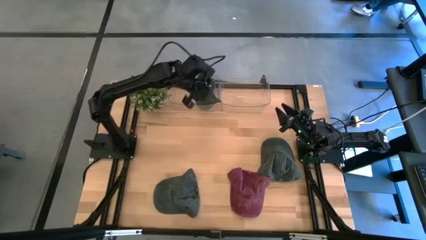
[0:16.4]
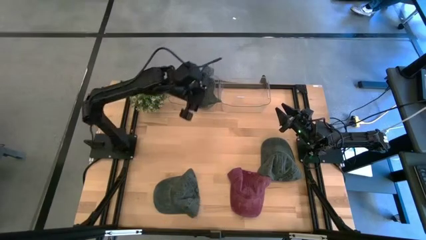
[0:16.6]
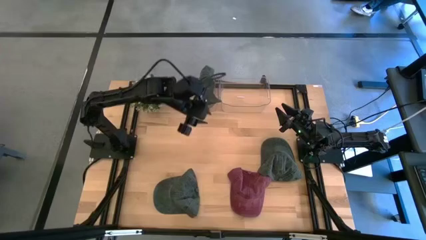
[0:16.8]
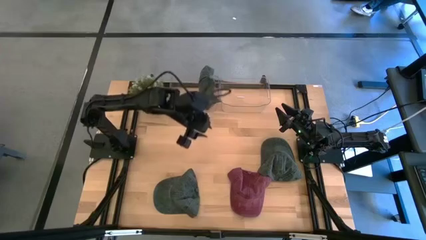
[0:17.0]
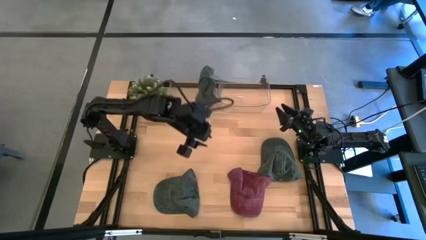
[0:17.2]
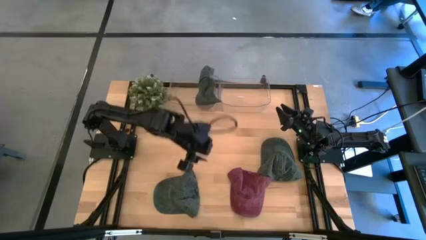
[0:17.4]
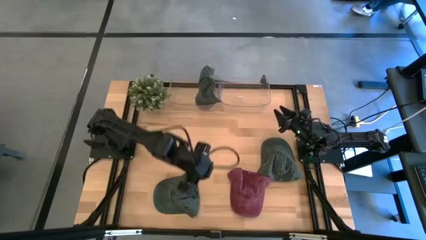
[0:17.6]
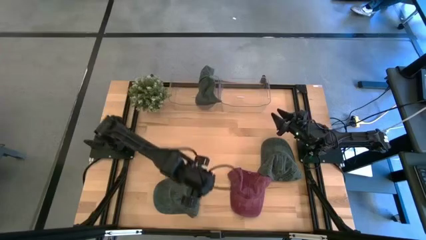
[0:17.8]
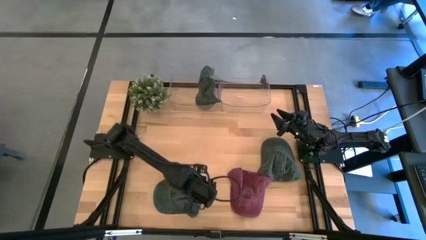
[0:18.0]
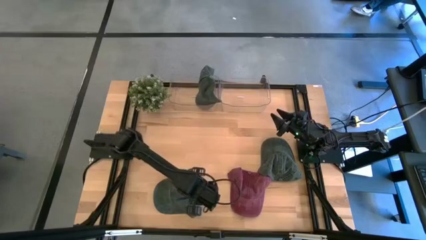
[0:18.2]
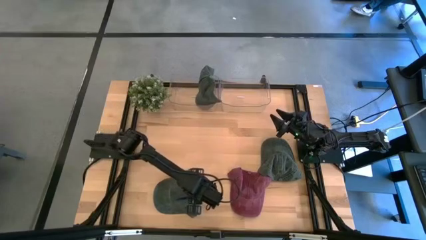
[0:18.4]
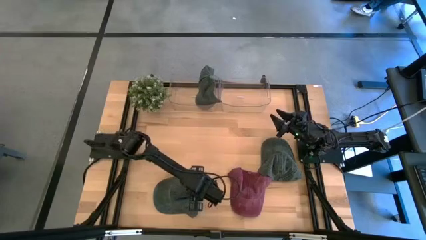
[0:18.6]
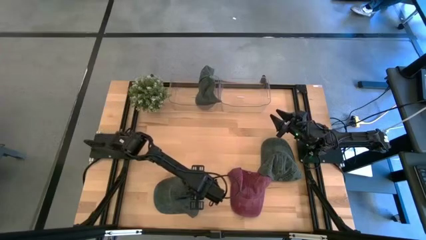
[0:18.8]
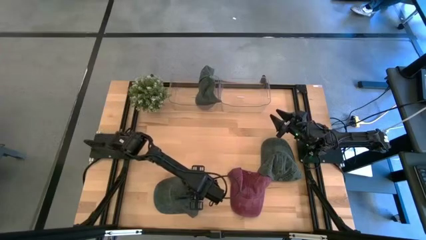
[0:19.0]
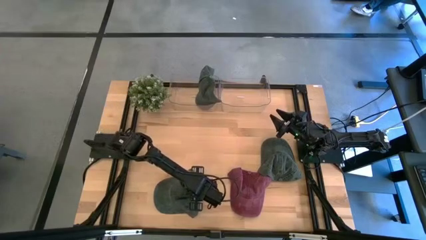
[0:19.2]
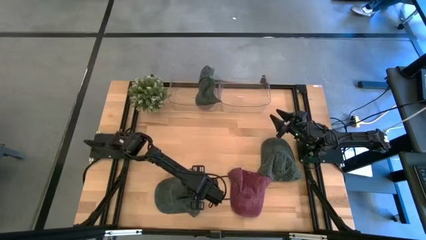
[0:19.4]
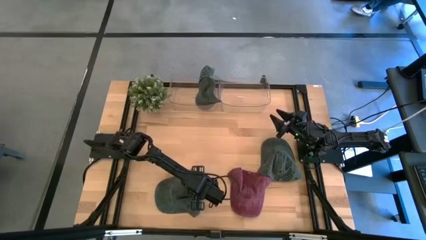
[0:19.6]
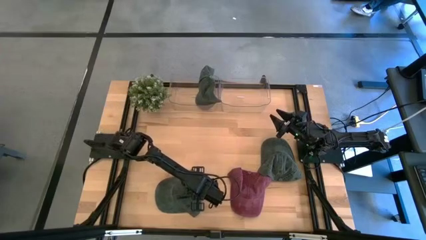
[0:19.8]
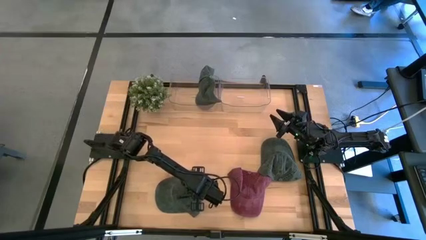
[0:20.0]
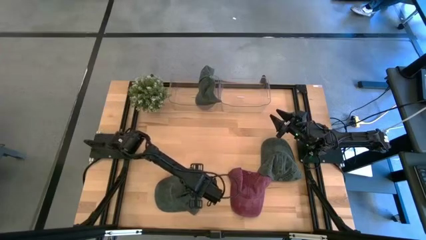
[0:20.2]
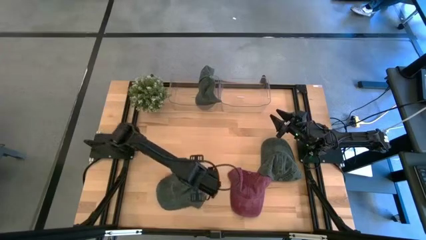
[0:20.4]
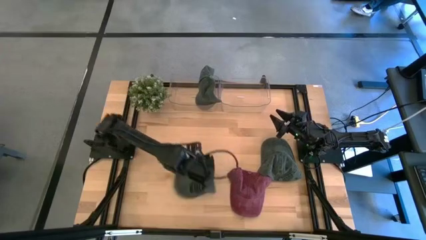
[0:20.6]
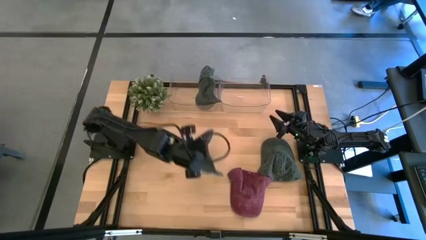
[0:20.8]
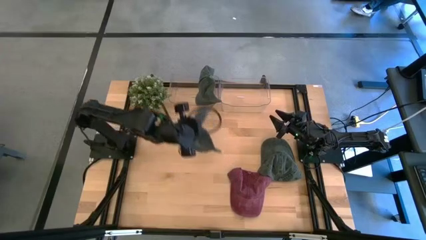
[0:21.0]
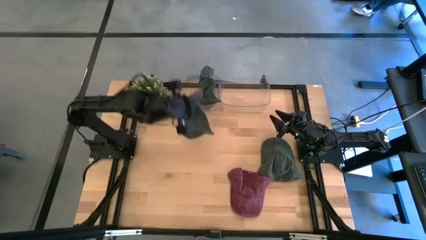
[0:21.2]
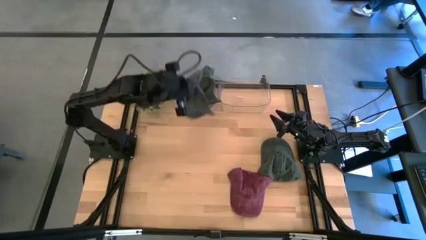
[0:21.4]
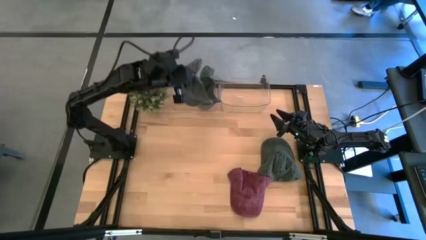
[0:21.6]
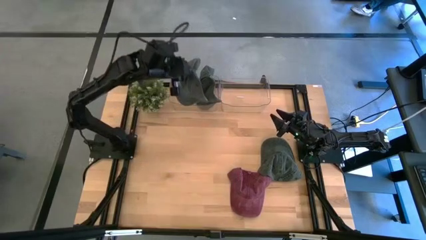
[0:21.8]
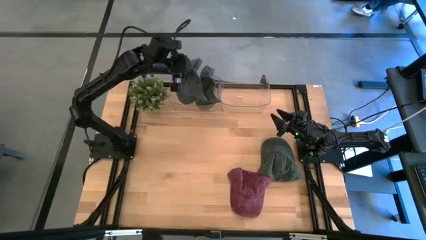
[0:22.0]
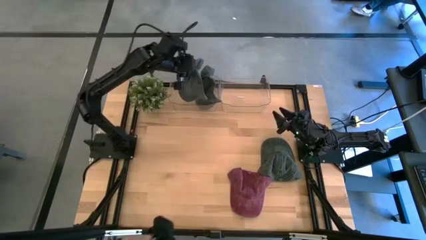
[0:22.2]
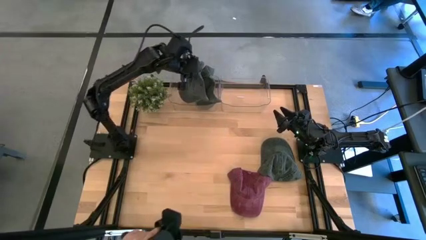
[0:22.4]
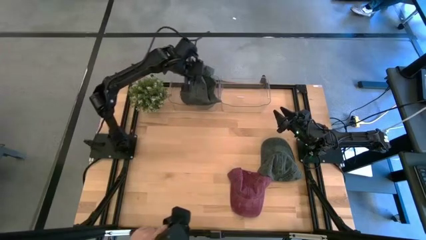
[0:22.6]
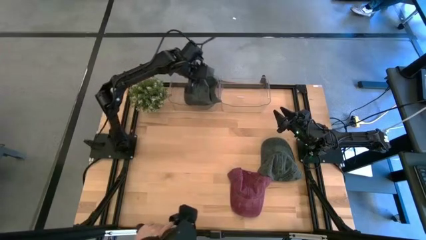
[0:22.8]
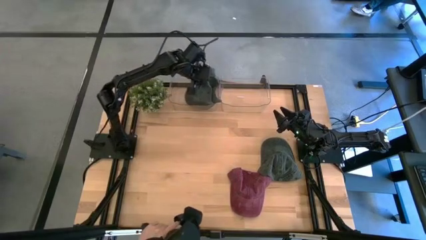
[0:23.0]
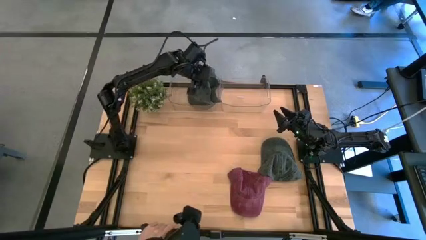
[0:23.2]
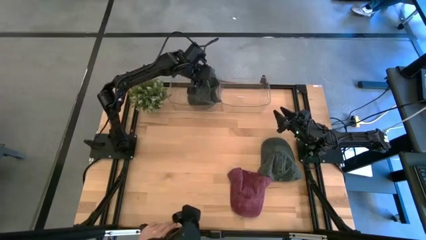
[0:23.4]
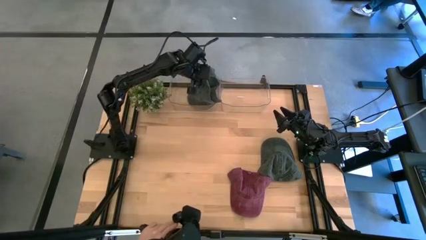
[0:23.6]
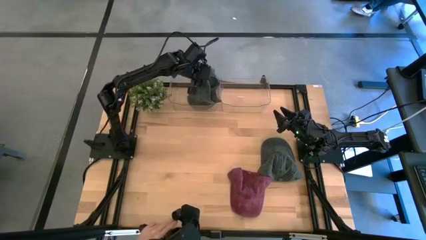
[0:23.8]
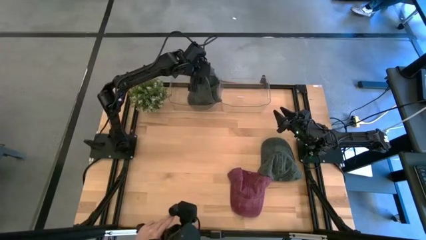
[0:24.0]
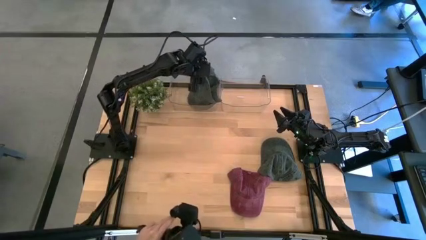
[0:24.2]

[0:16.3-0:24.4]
Task: Pick & Place hat
Put the left black cap into the left transparent bin

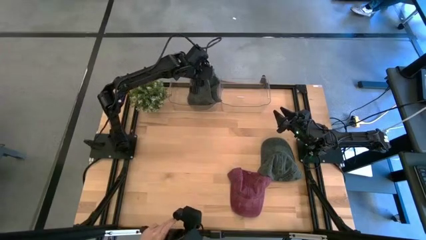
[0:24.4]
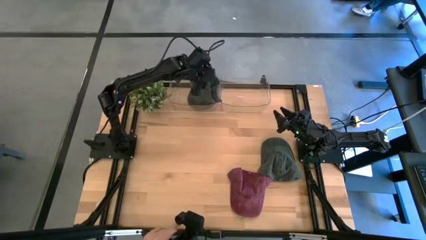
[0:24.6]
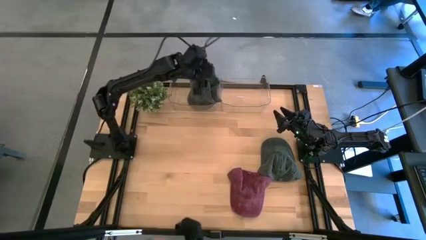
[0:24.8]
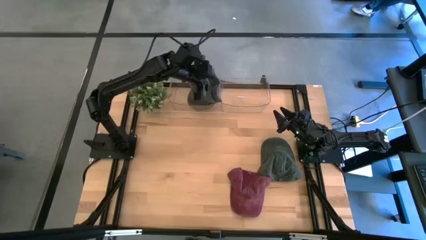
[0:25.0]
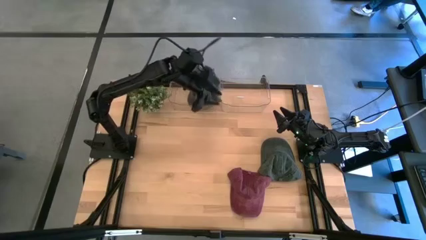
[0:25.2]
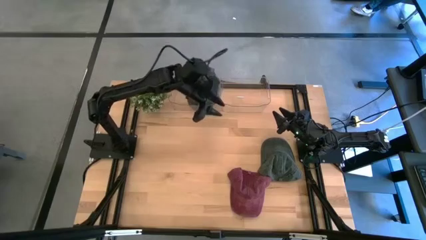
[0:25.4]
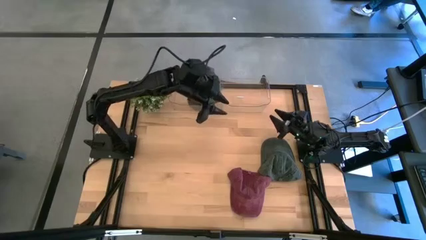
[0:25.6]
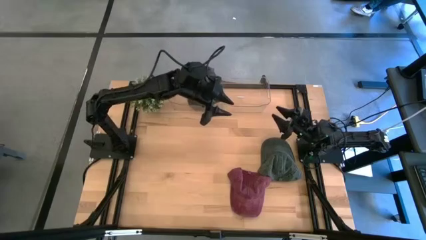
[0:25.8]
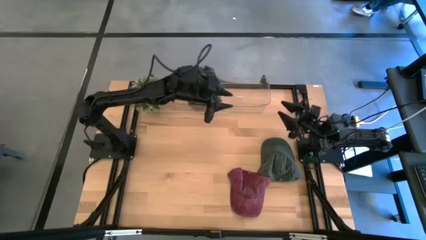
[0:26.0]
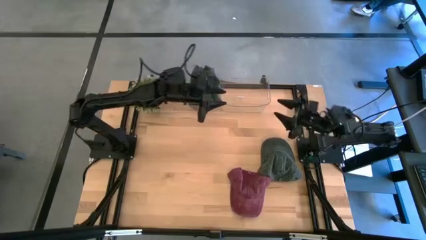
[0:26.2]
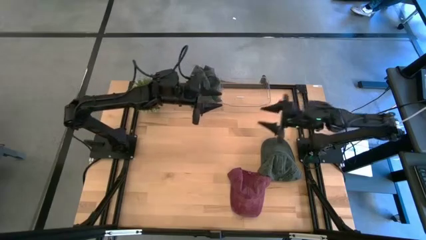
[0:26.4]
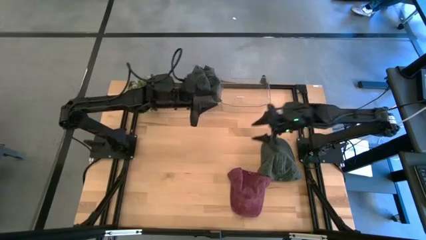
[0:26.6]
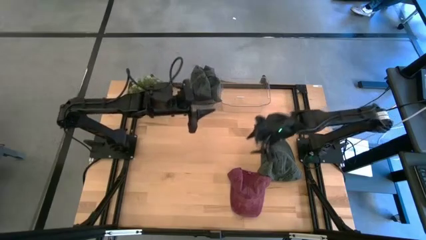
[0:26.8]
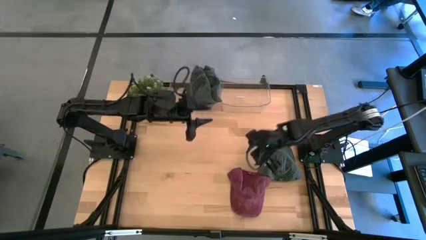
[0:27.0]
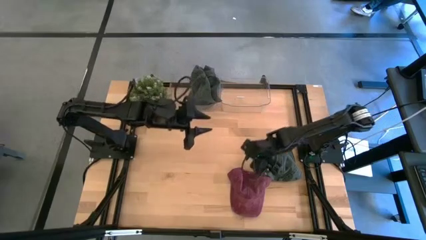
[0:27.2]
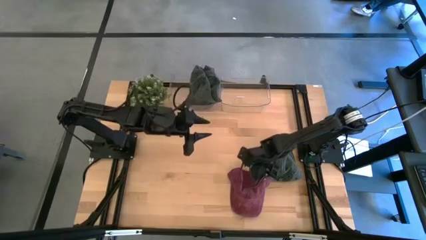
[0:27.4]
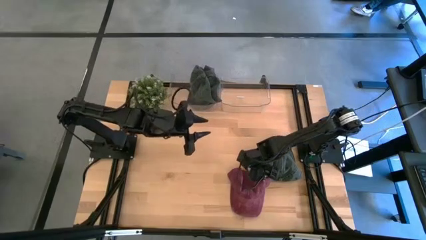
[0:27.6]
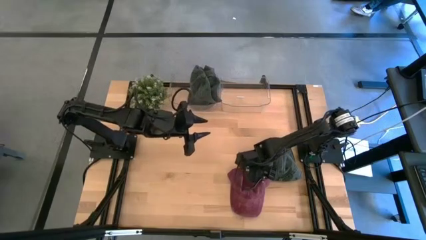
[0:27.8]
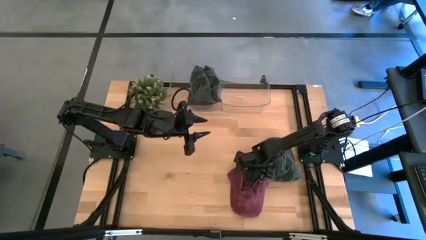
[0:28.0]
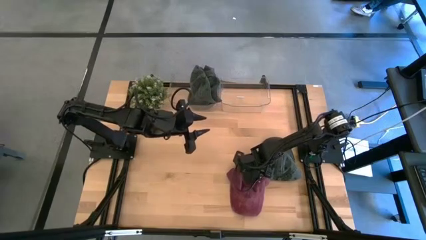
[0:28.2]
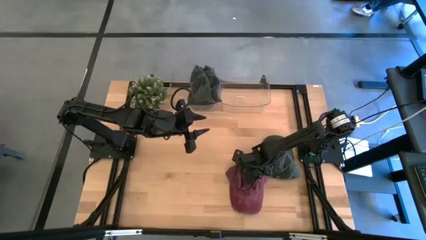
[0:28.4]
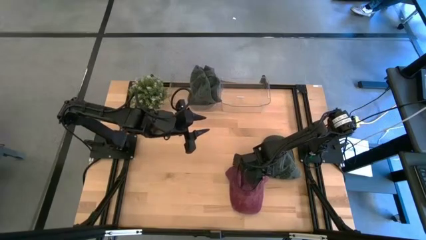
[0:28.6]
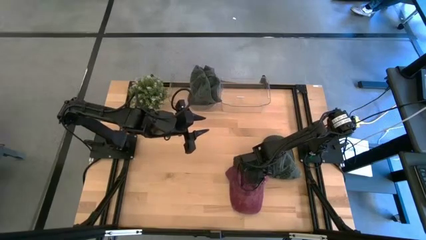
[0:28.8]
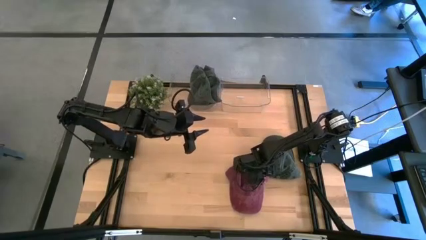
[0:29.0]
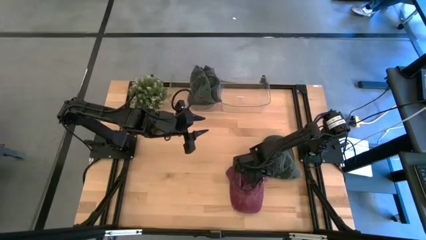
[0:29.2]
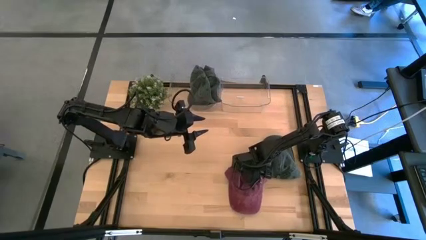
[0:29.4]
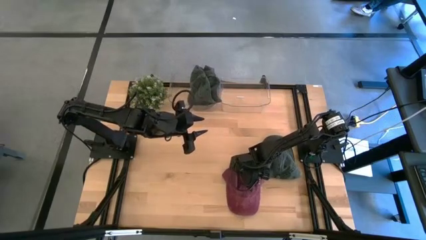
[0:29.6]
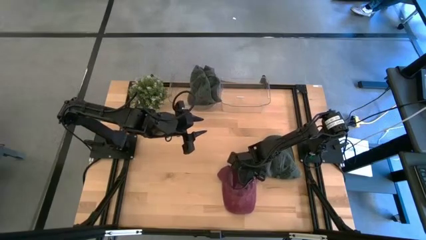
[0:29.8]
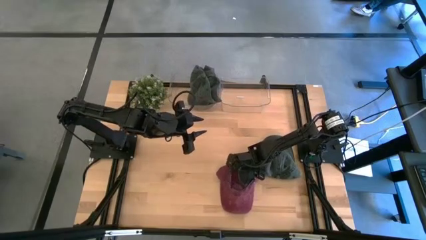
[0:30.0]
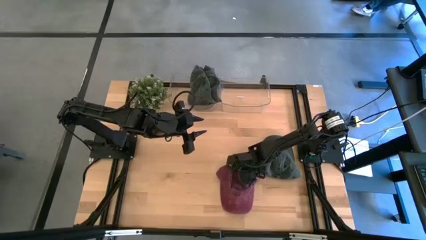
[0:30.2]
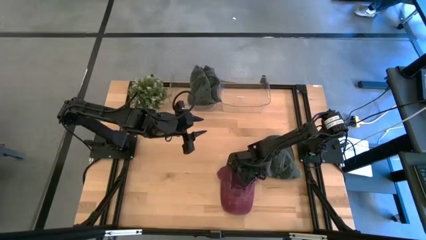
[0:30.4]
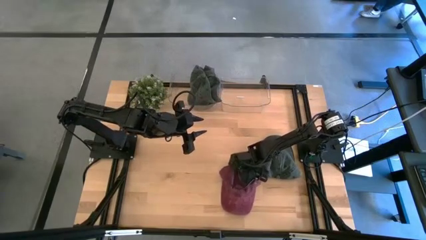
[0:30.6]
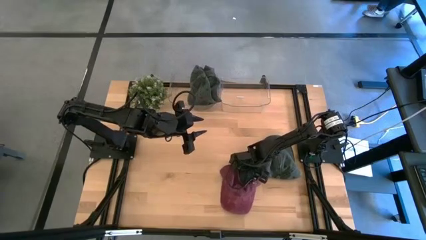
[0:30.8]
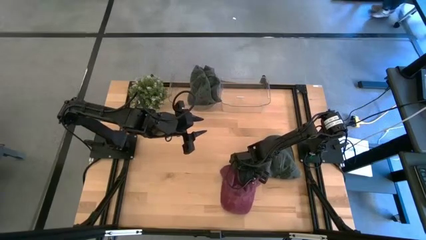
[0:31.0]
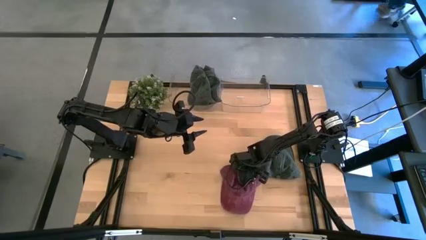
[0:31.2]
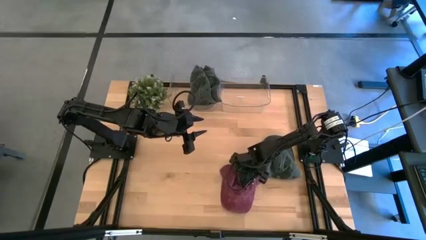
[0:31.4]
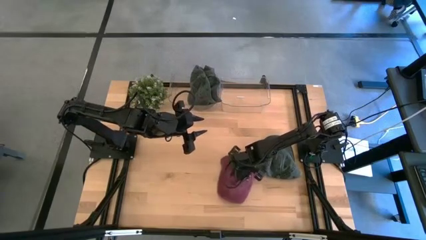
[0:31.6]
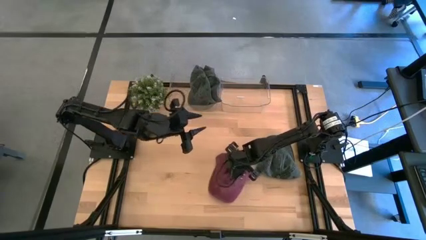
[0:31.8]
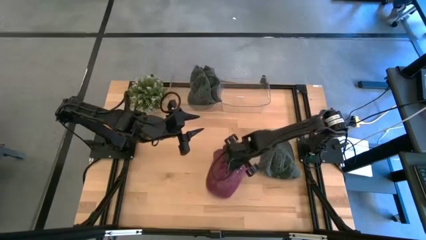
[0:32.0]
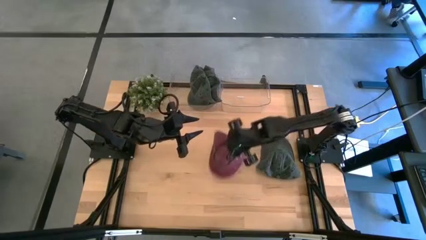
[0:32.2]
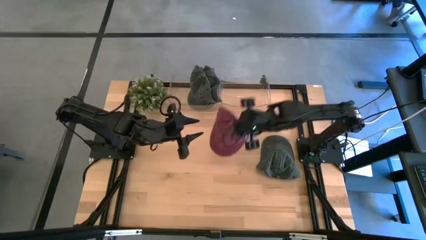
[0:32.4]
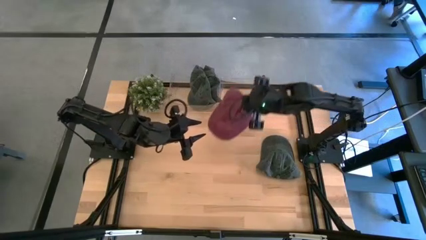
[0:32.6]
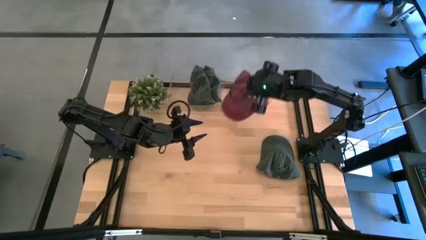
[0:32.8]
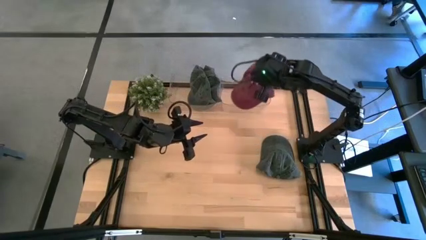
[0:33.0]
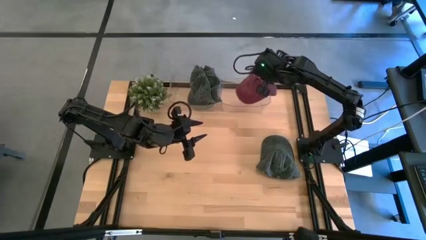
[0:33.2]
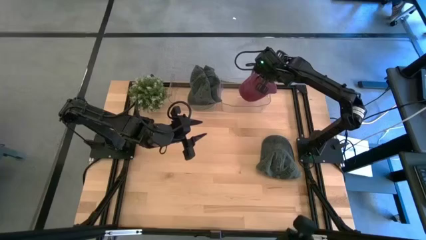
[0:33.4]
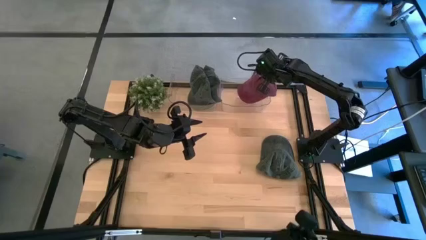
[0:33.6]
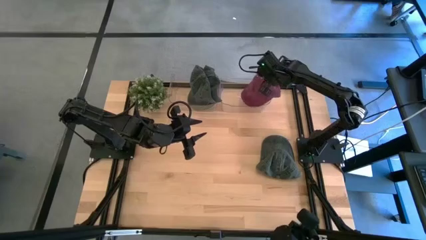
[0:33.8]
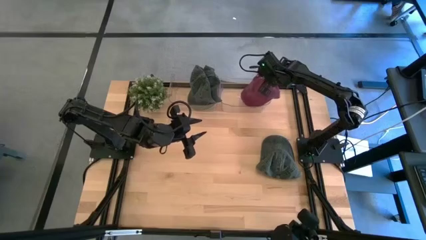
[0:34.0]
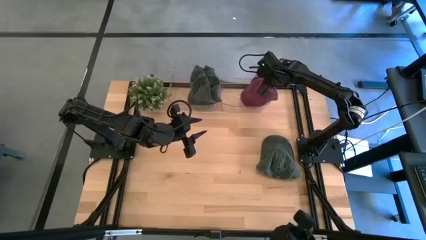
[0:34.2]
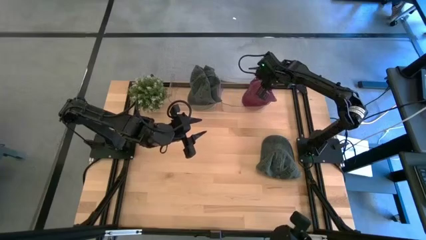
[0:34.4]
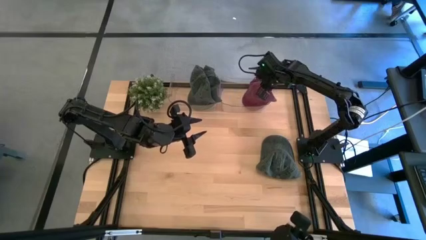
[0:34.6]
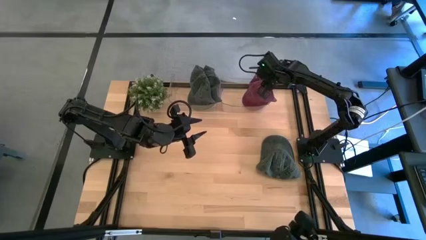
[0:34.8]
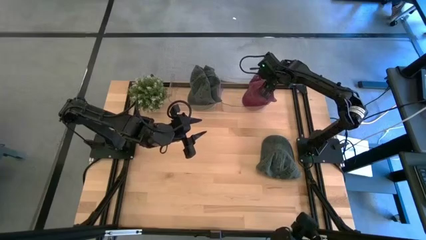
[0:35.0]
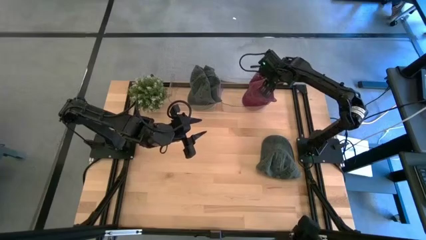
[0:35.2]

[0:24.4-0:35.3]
Put the light pink cap into the right transparent bin
